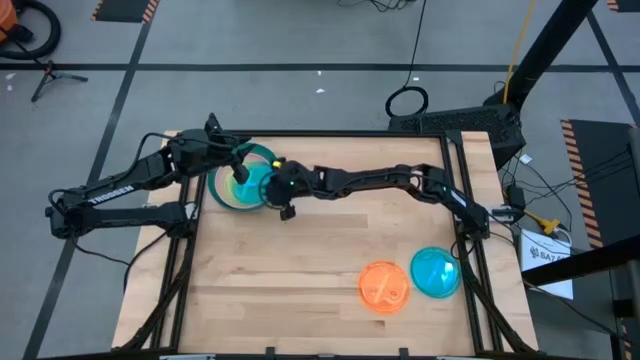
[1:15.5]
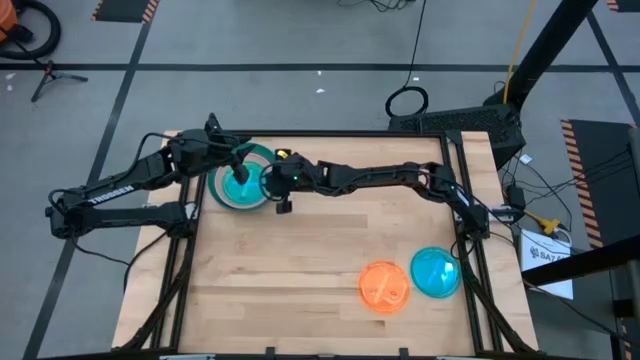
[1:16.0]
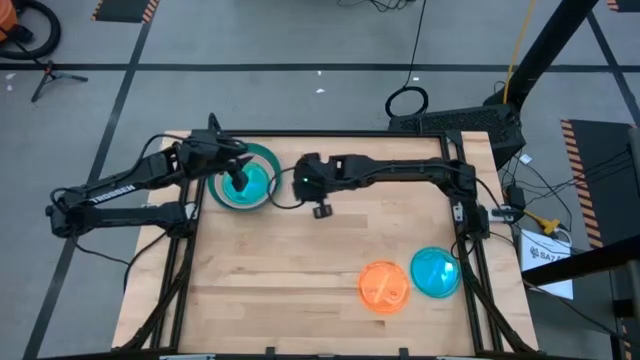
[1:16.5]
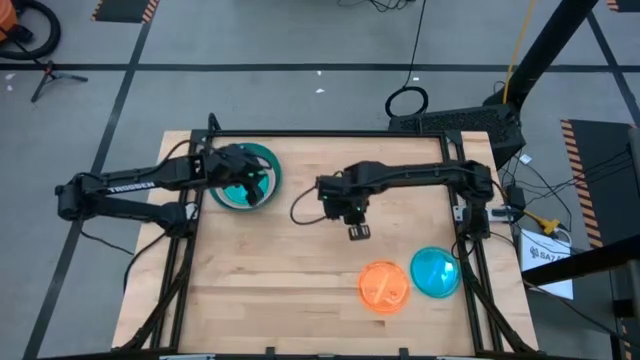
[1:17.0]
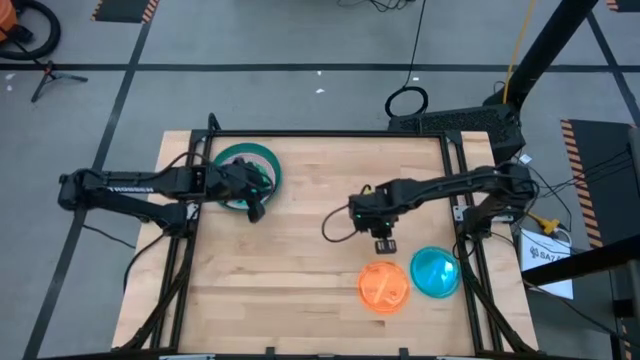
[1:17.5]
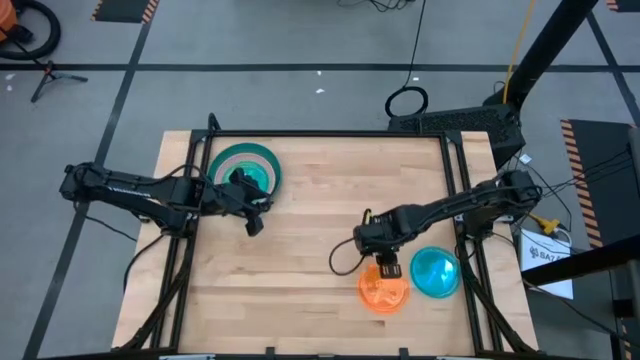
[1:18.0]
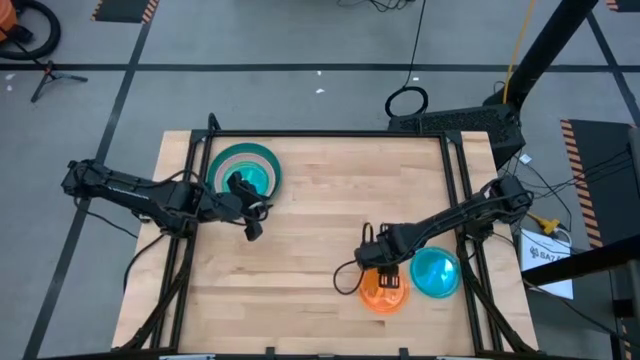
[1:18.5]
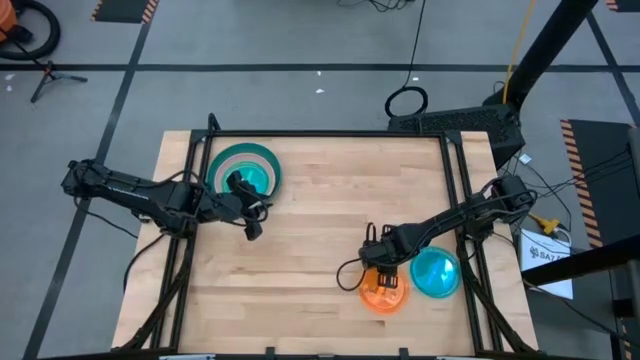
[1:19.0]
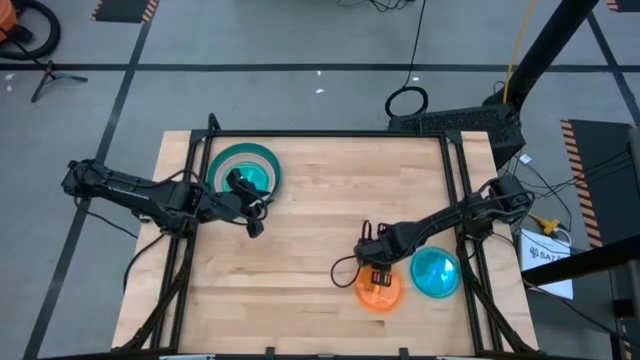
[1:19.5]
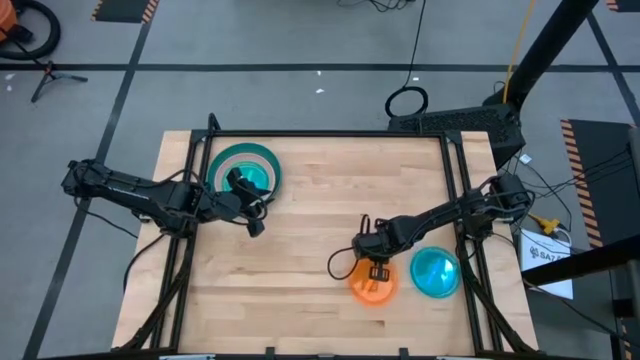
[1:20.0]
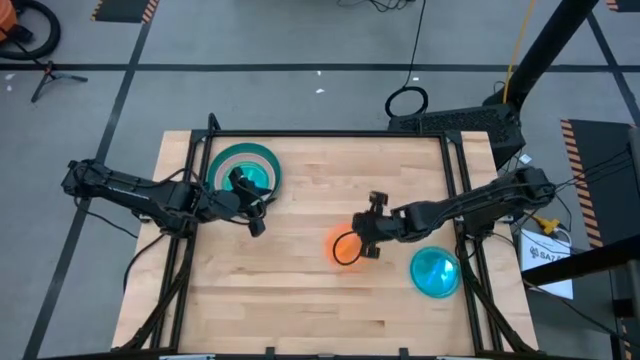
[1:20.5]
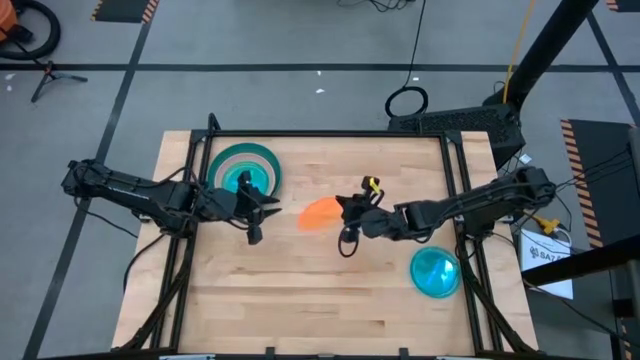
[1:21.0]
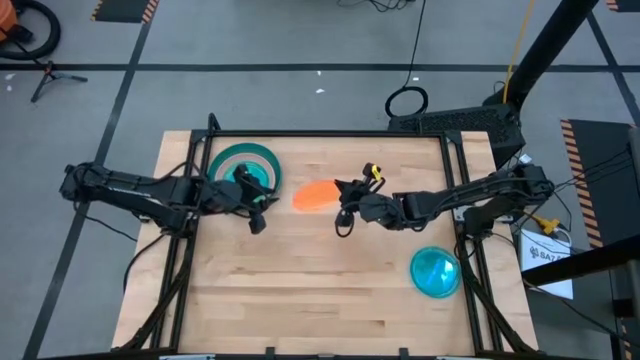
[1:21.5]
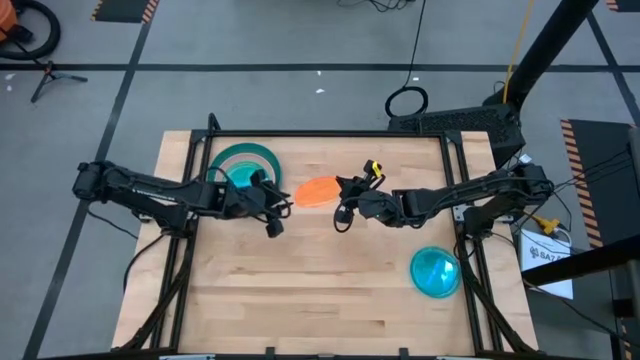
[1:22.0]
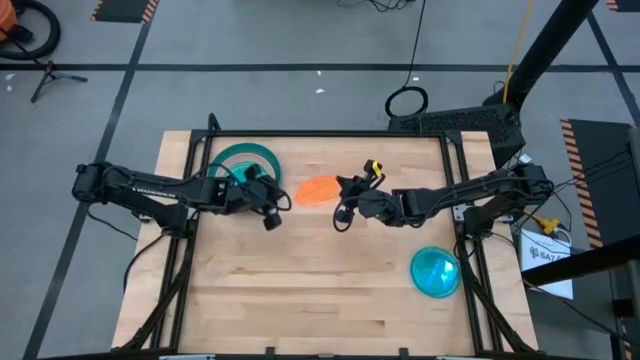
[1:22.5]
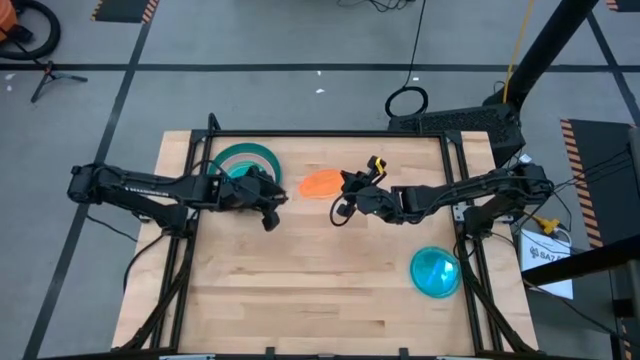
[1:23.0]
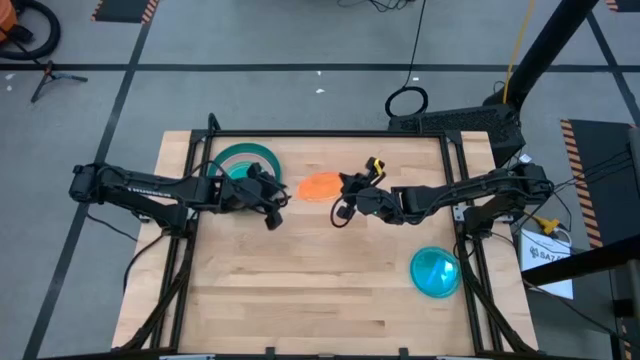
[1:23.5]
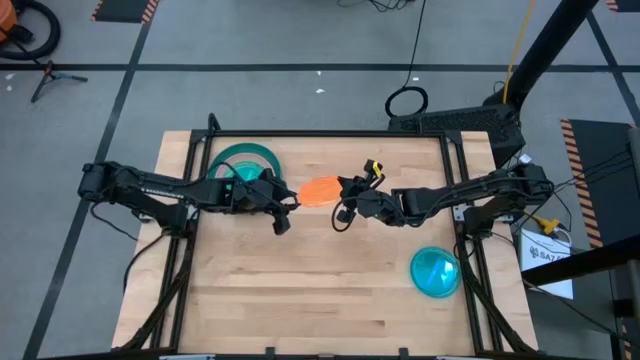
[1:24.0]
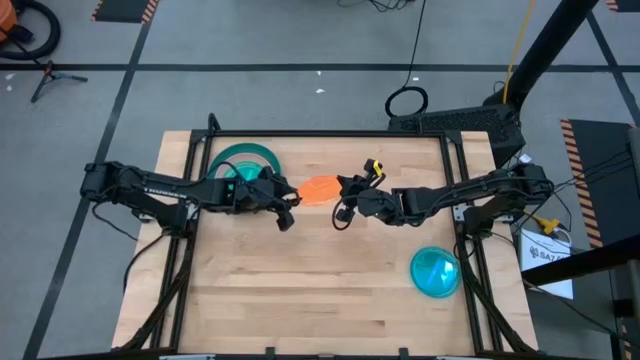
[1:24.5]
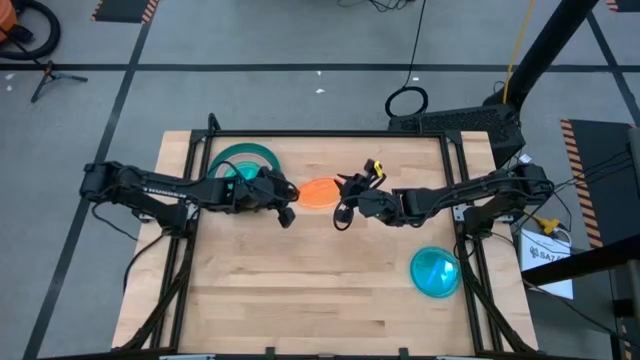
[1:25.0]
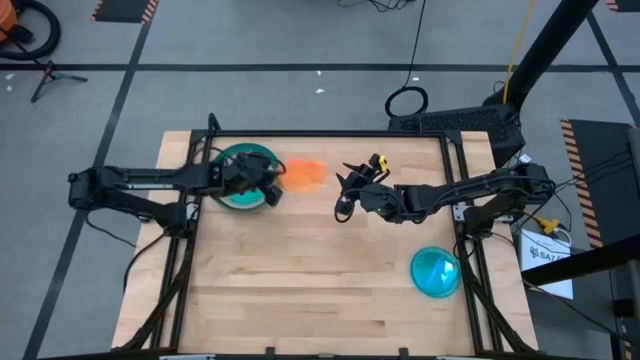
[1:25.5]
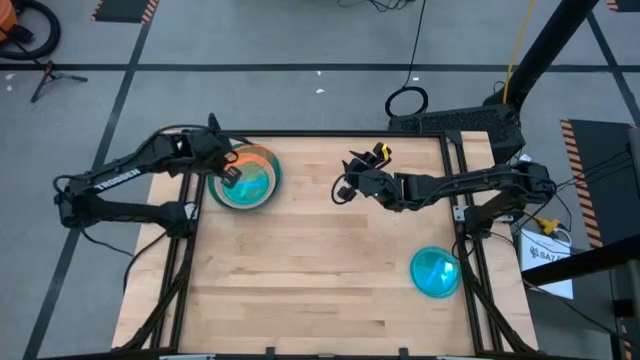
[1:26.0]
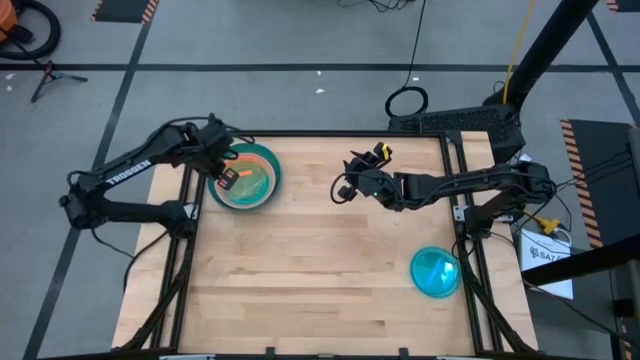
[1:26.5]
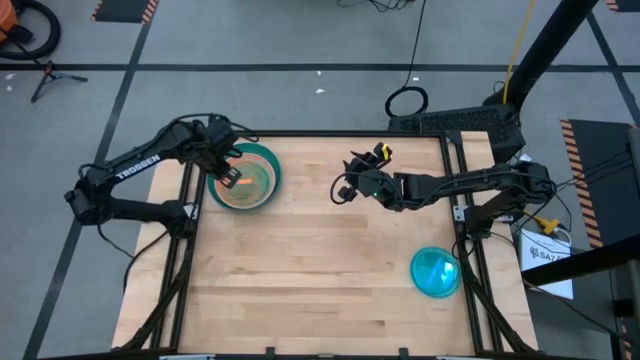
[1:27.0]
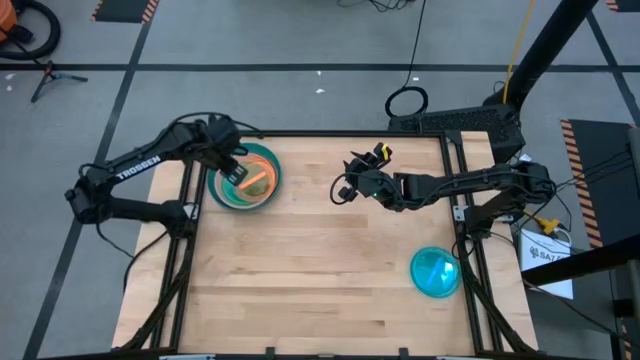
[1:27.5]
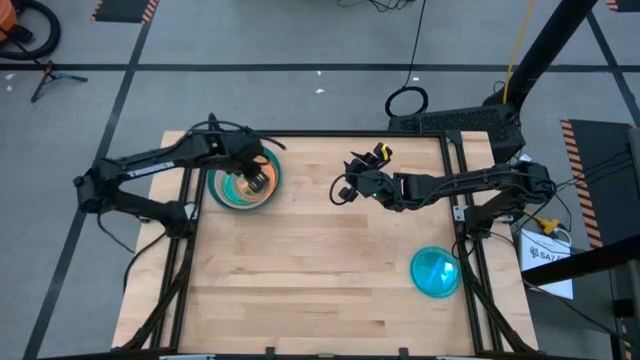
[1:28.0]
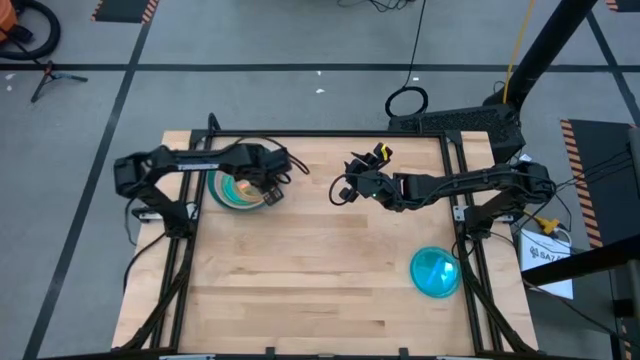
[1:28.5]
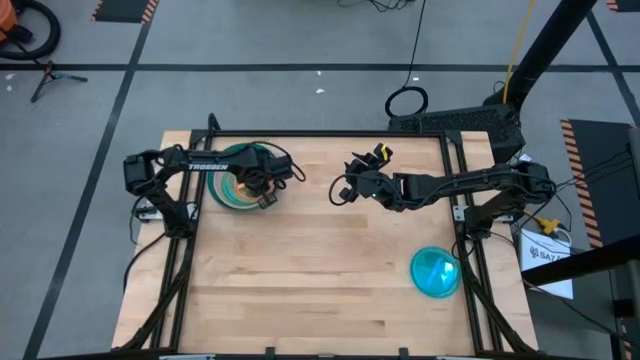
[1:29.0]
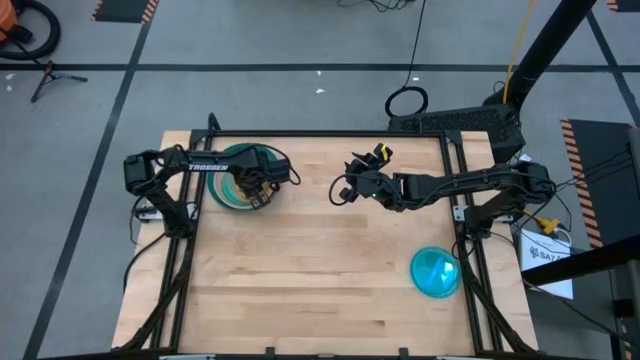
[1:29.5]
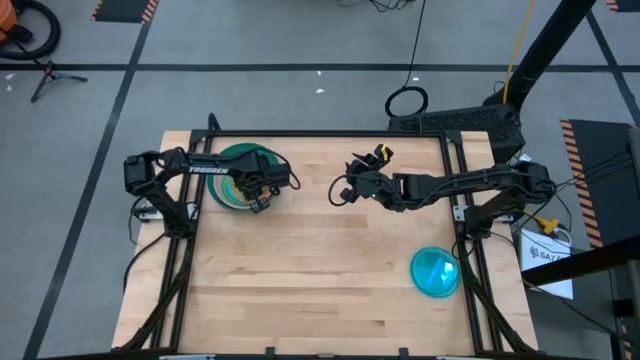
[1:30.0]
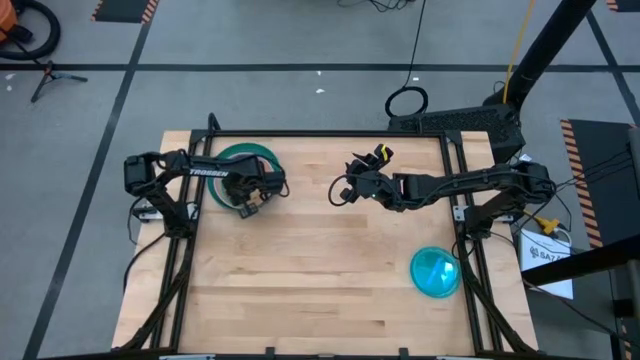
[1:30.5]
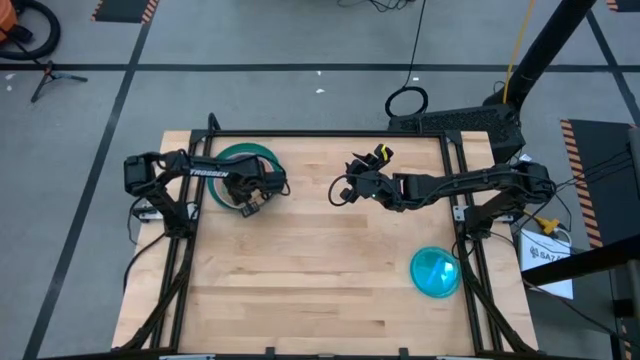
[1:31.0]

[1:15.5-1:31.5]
Task: Stack plastic plates
Stack the orange plate on top of the blue plate

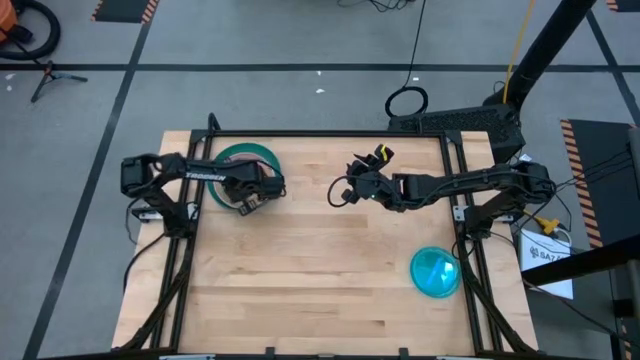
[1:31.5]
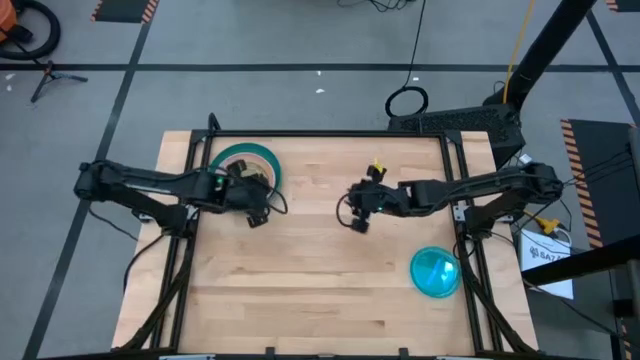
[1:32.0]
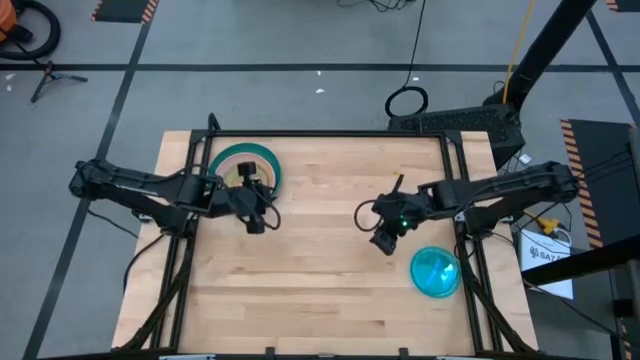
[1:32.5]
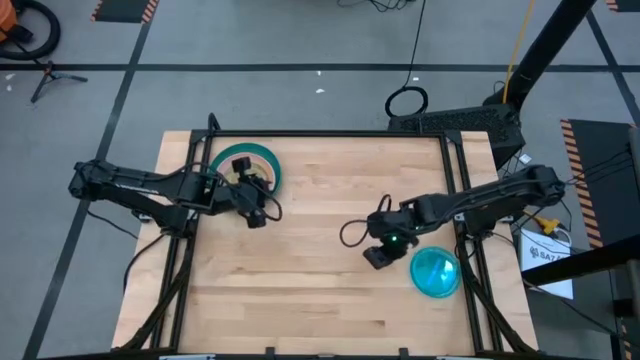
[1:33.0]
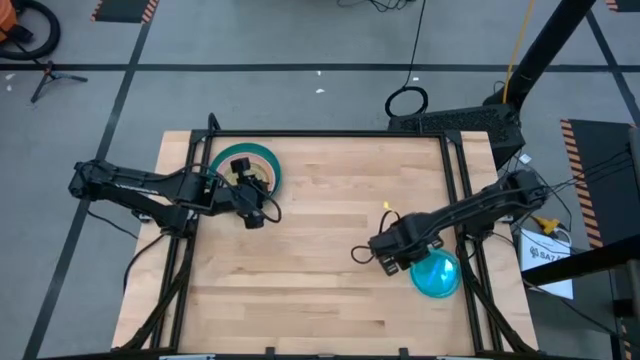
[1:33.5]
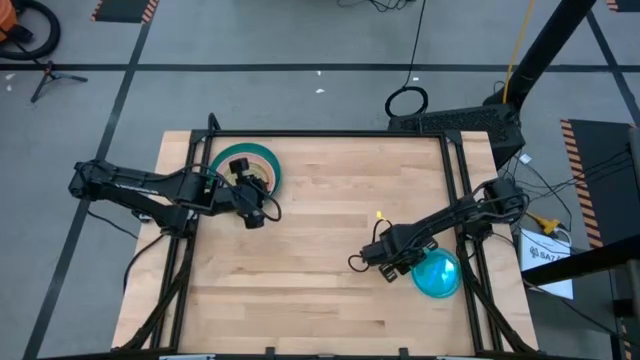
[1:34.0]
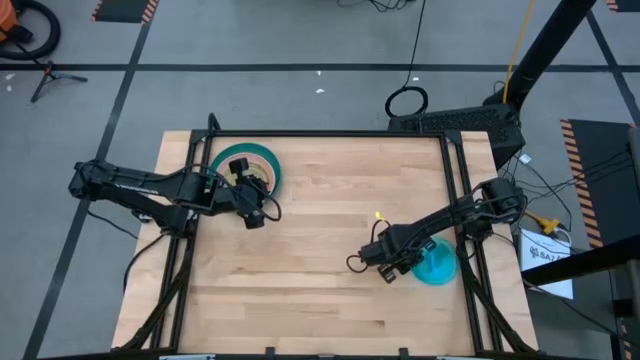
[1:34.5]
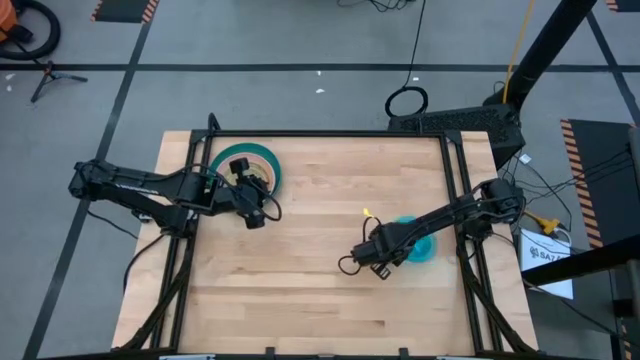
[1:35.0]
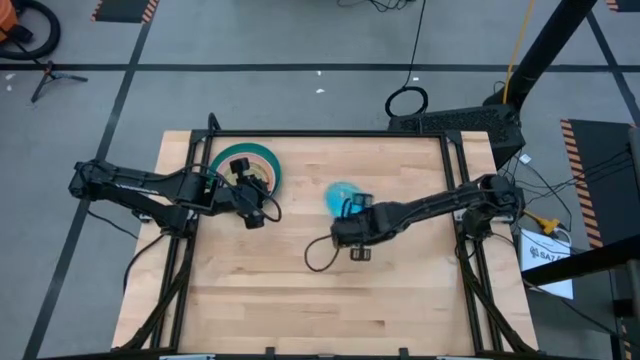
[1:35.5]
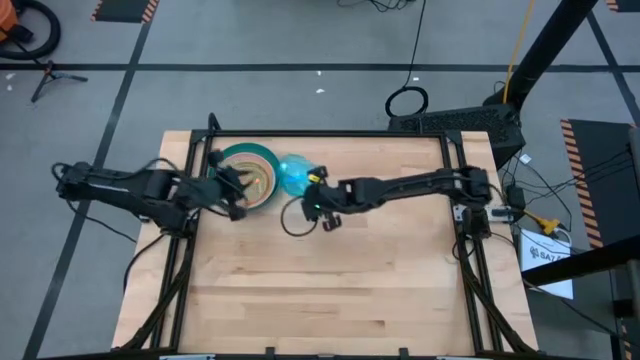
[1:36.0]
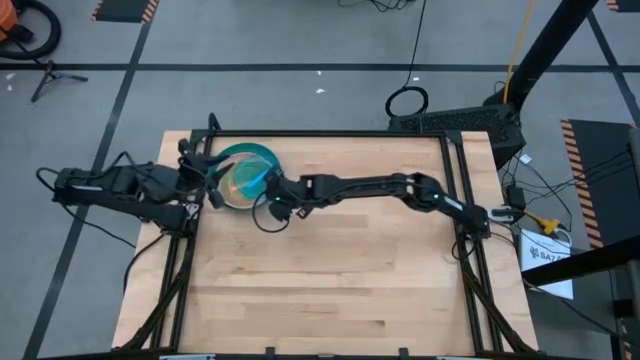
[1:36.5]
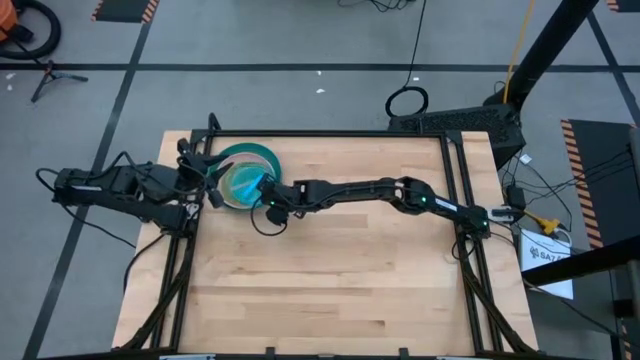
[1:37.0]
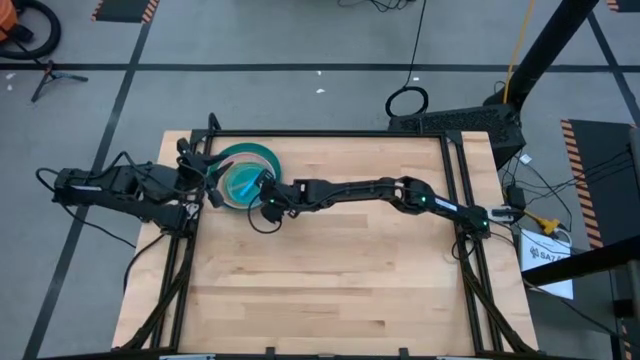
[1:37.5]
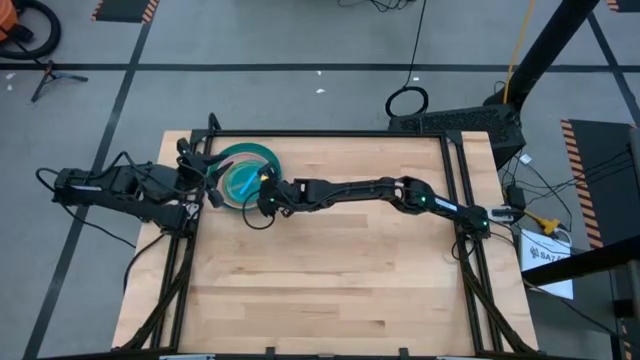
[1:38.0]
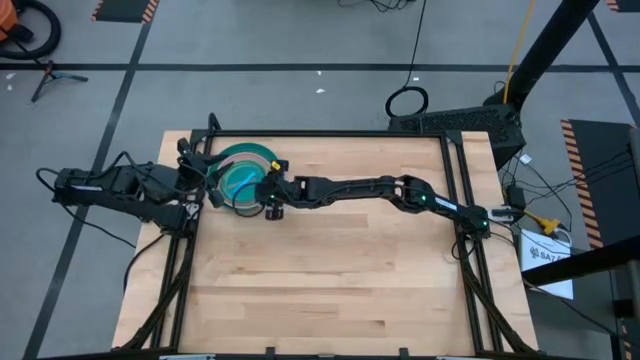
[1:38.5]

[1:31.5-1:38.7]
Stack the blue plate on top of the orange plate
